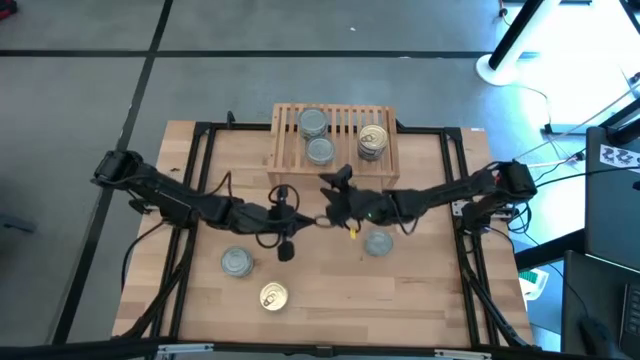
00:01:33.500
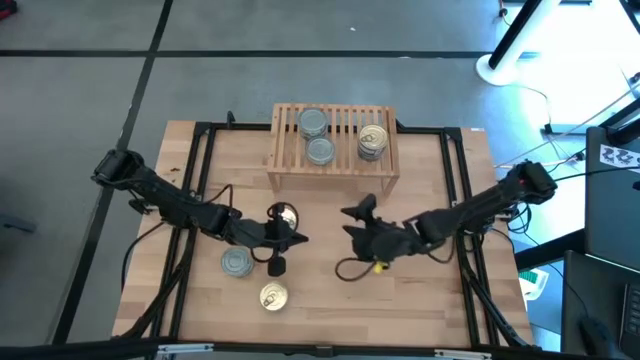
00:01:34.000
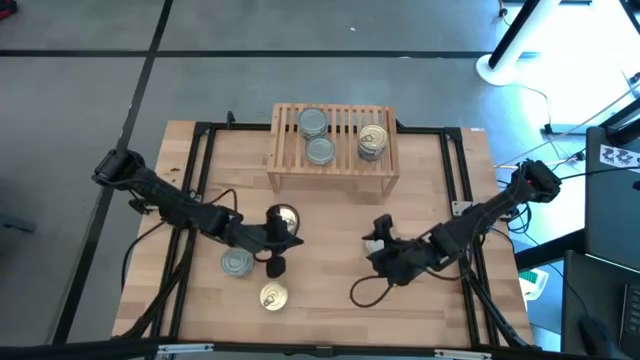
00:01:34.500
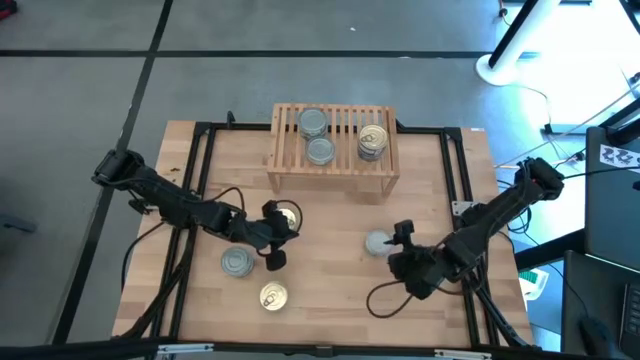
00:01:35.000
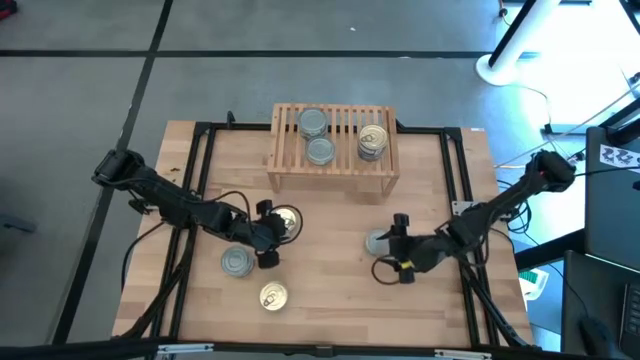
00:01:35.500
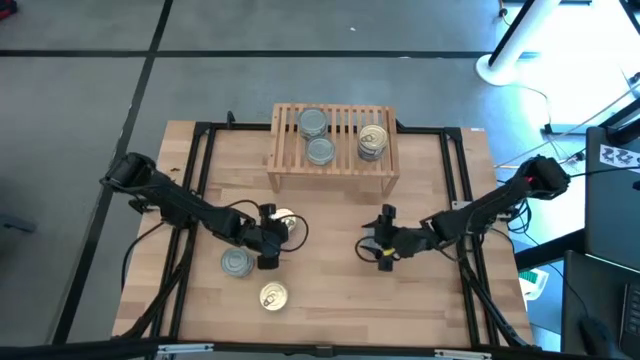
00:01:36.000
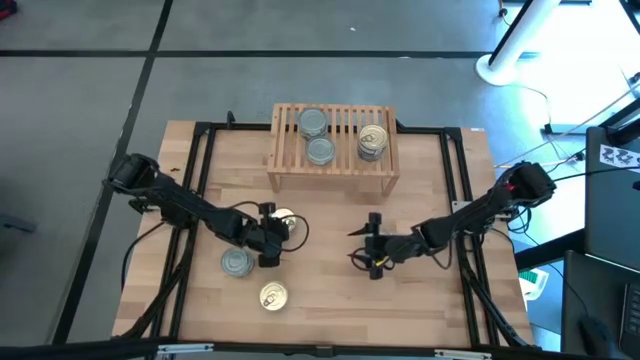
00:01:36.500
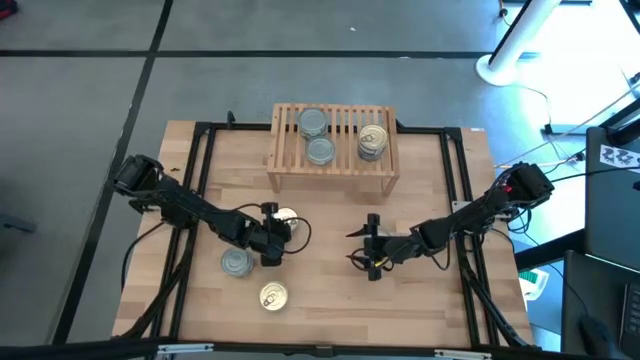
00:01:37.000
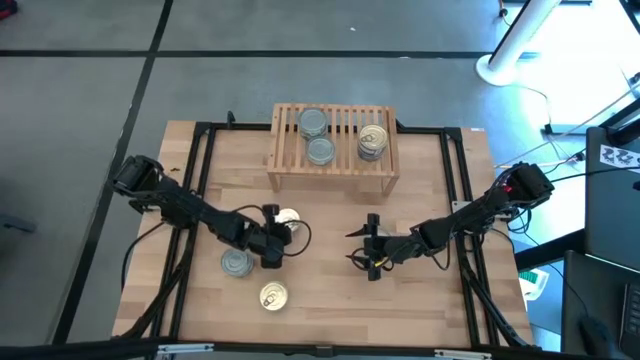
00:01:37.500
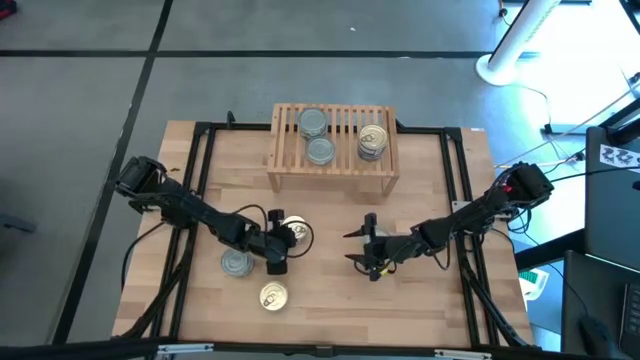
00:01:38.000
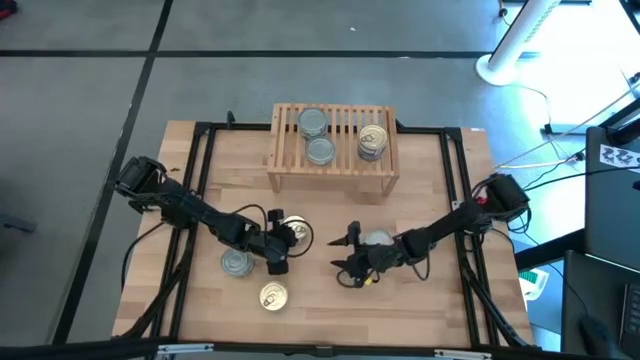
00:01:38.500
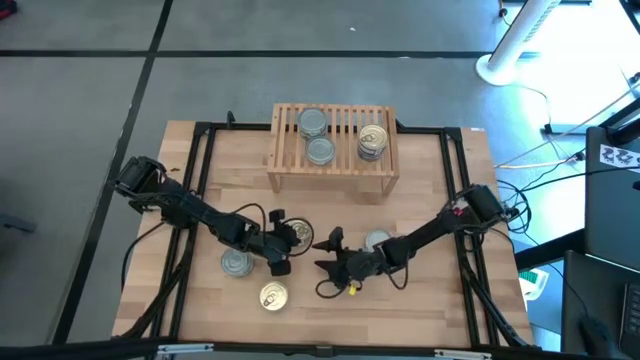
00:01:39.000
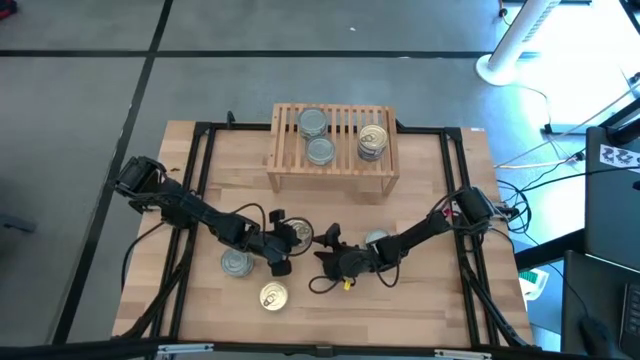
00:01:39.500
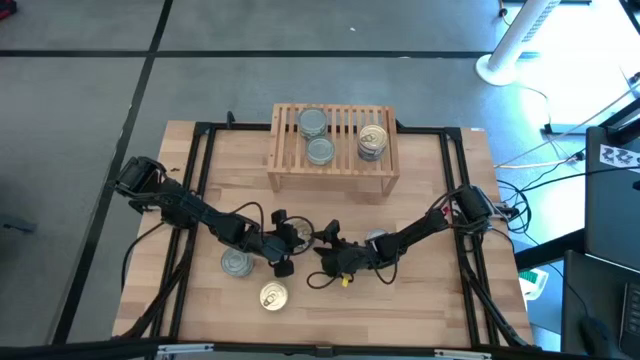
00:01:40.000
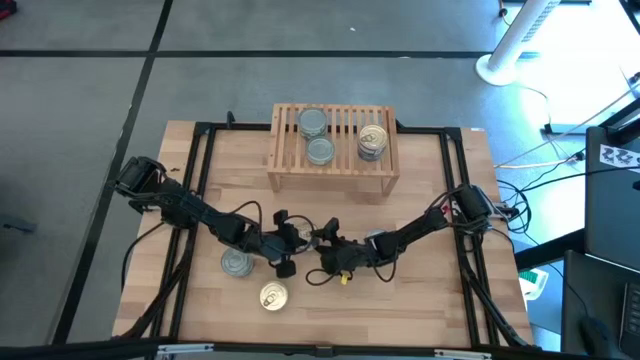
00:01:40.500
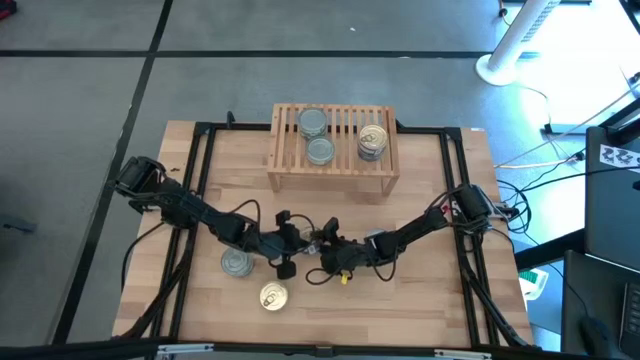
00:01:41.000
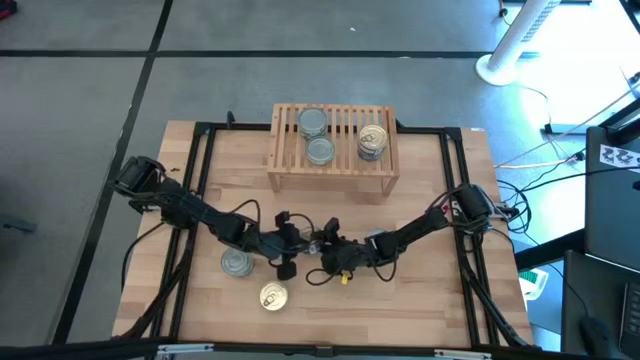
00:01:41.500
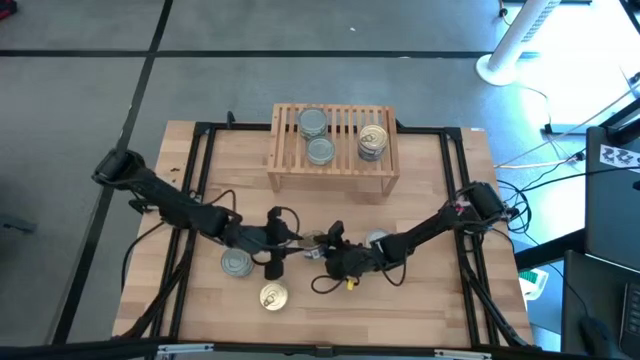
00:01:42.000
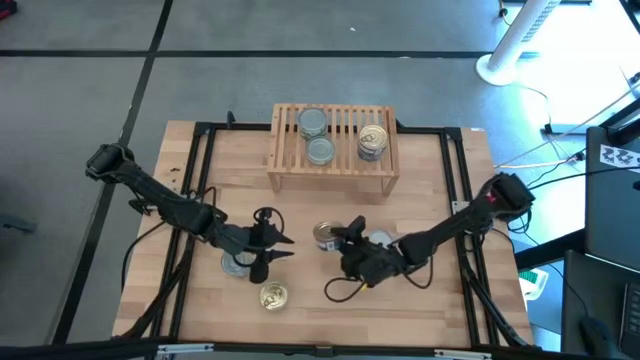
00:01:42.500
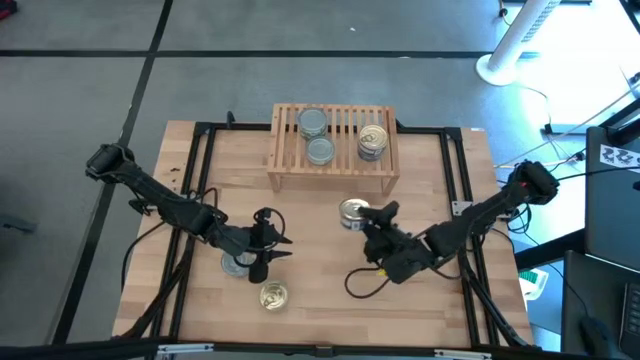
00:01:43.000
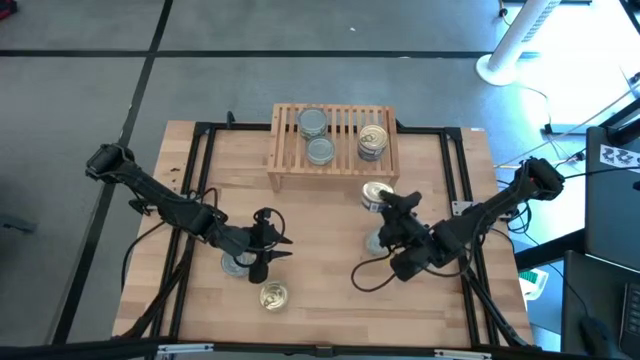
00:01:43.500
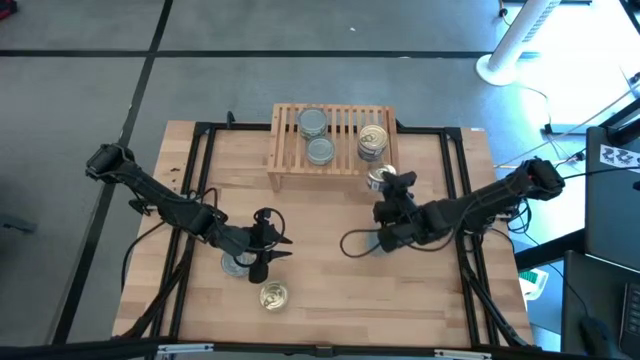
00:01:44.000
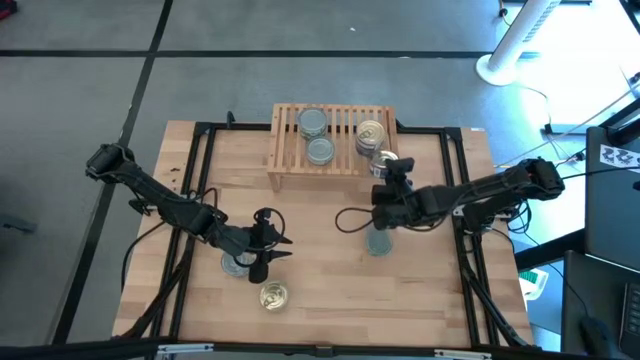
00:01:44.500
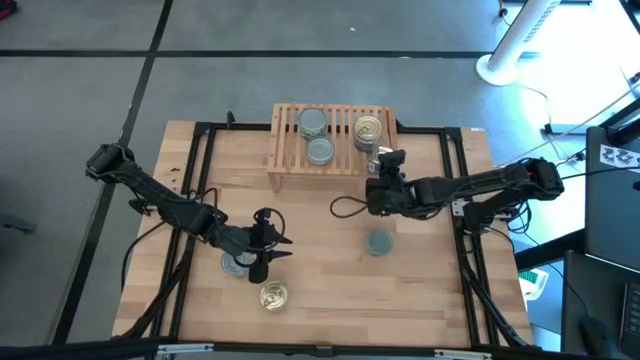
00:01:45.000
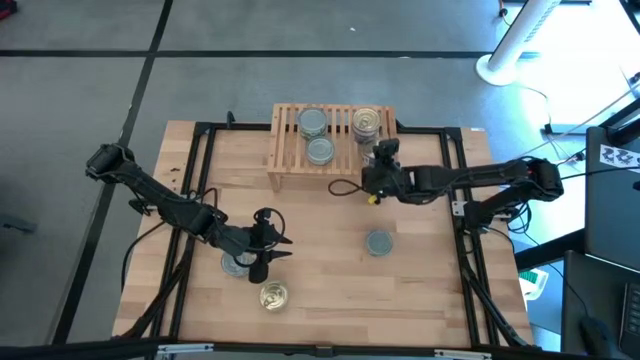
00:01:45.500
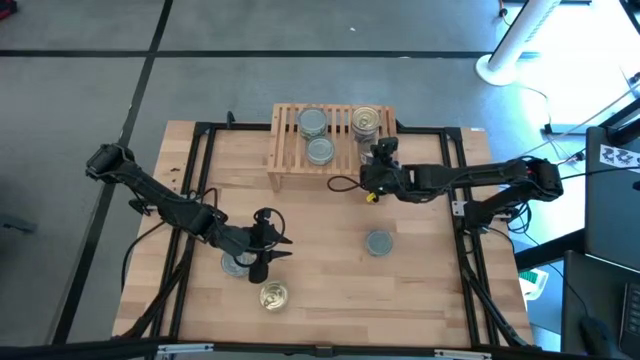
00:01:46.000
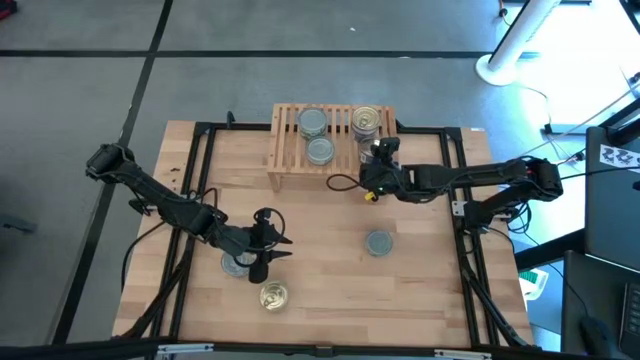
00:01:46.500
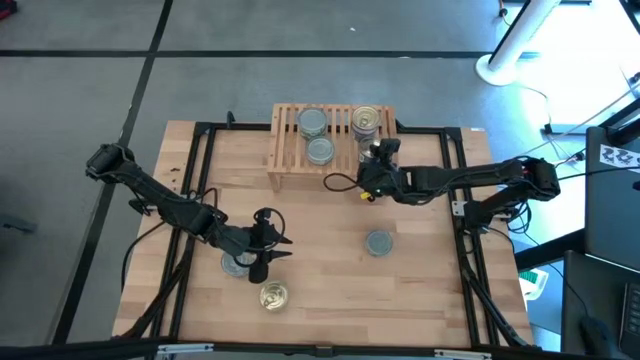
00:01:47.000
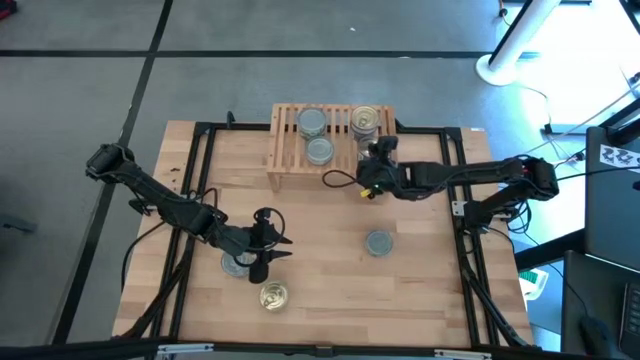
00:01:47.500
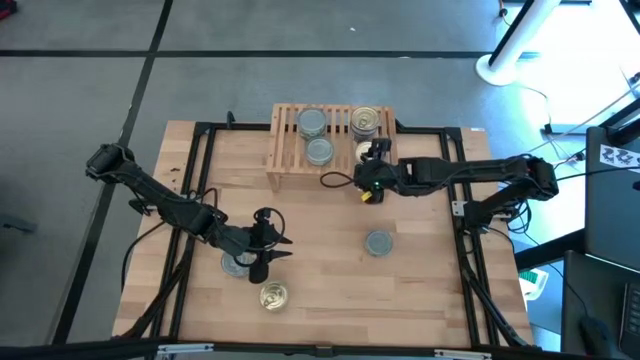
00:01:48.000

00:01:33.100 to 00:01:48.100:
Task: Stack canned seafood by type on shelf
Put the blue pink tuna can on the shelf aligned with the other blue pink tuna can
